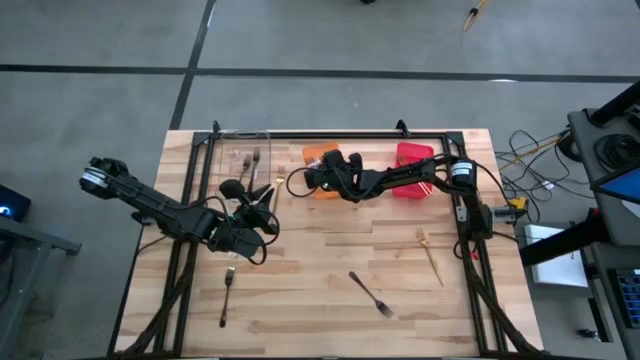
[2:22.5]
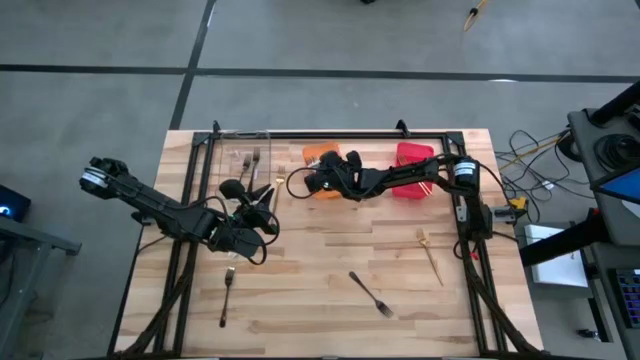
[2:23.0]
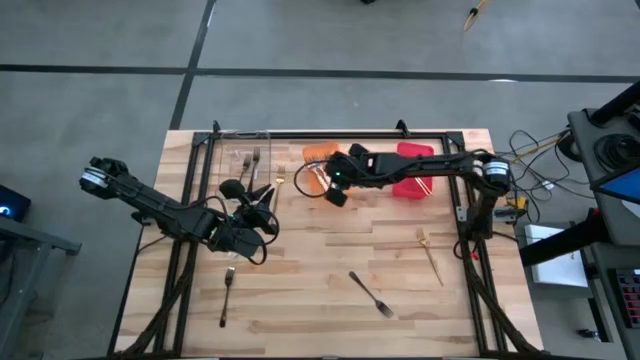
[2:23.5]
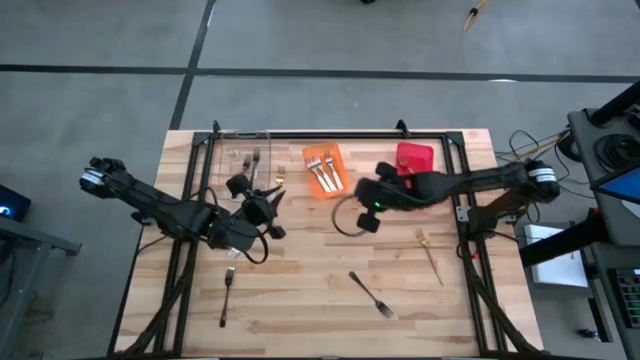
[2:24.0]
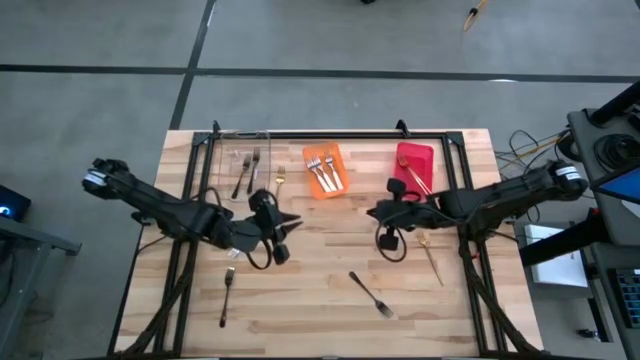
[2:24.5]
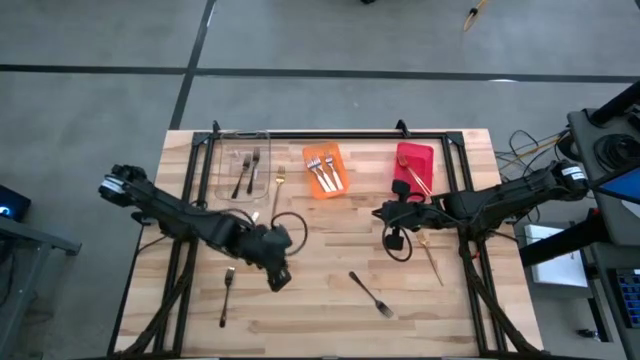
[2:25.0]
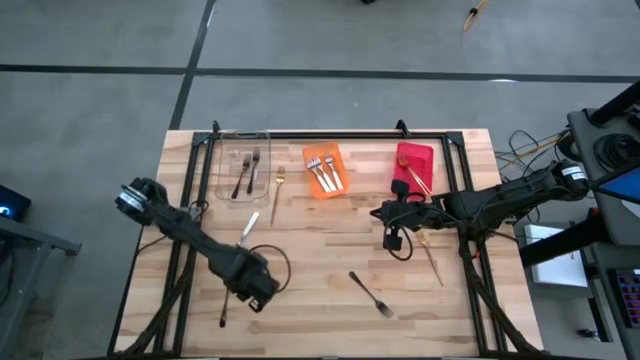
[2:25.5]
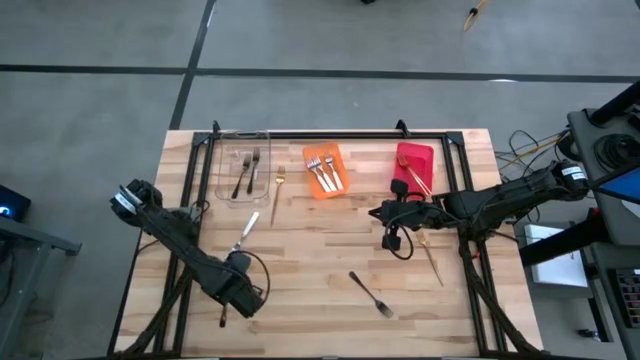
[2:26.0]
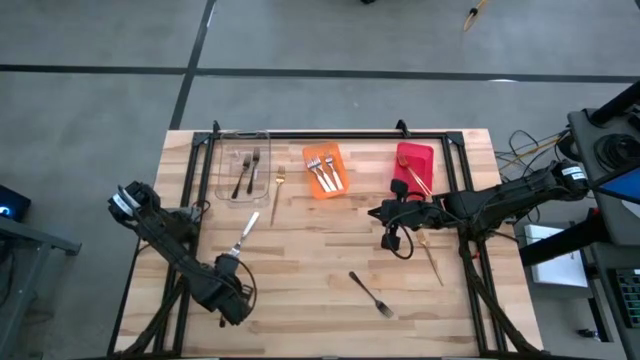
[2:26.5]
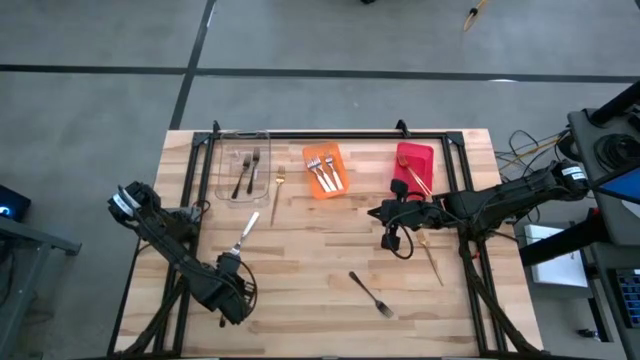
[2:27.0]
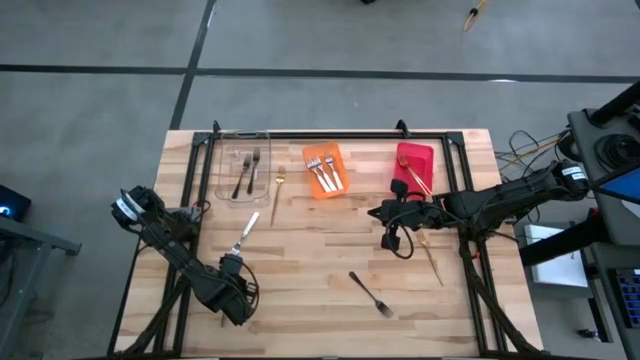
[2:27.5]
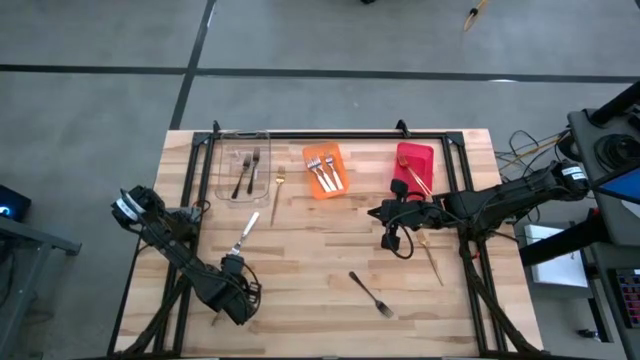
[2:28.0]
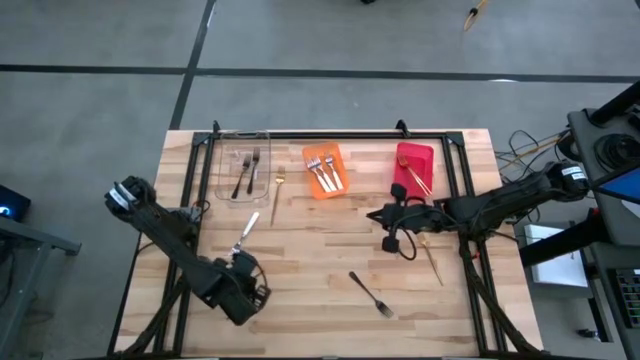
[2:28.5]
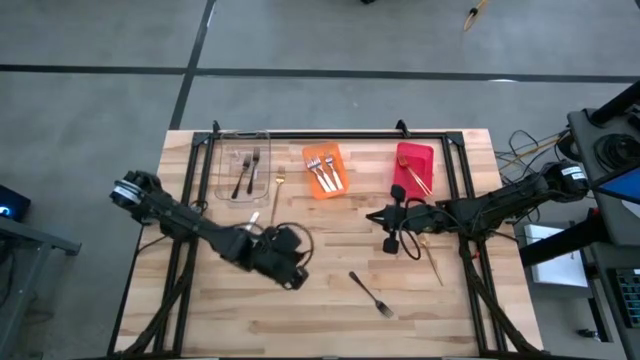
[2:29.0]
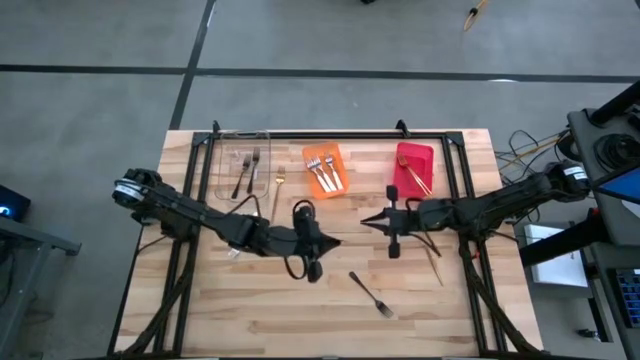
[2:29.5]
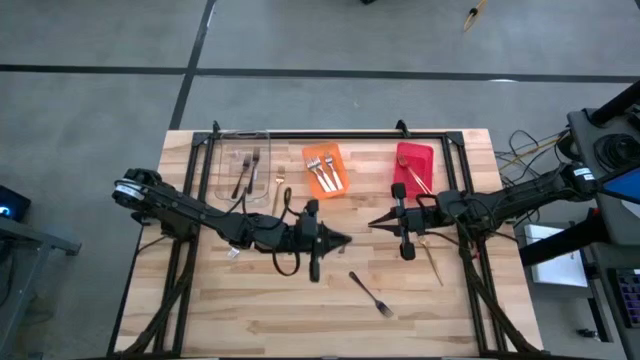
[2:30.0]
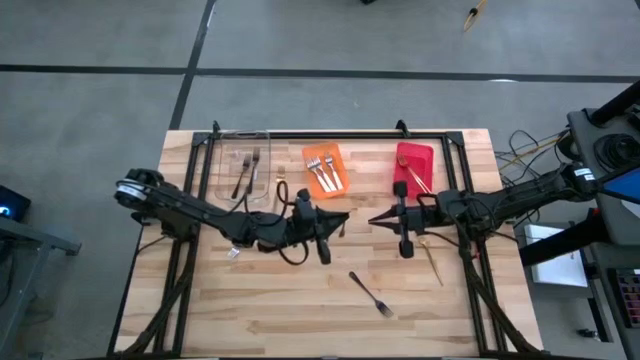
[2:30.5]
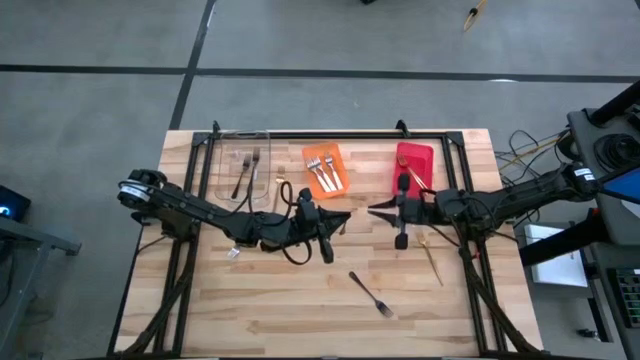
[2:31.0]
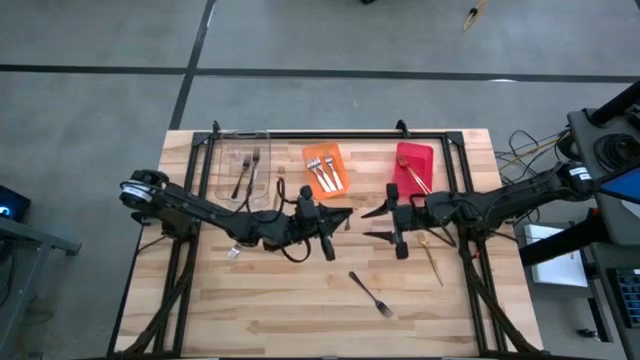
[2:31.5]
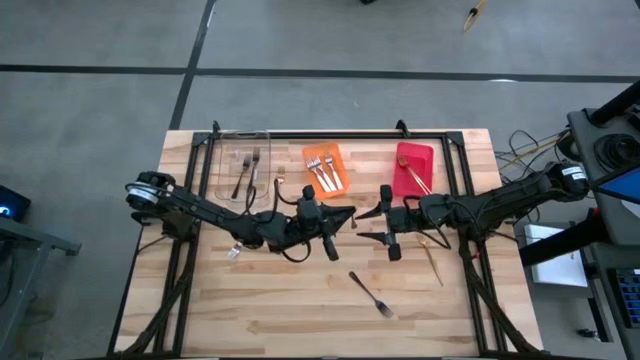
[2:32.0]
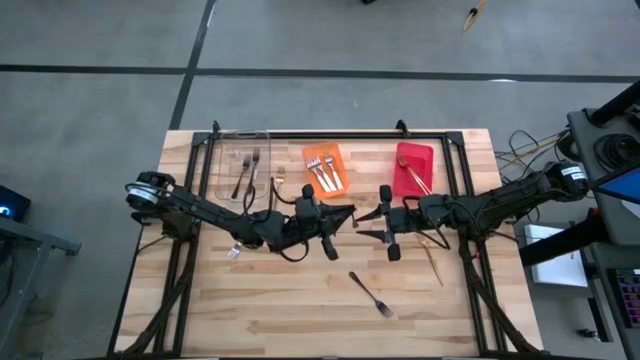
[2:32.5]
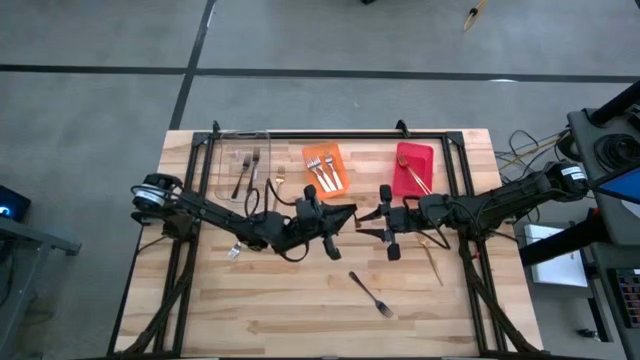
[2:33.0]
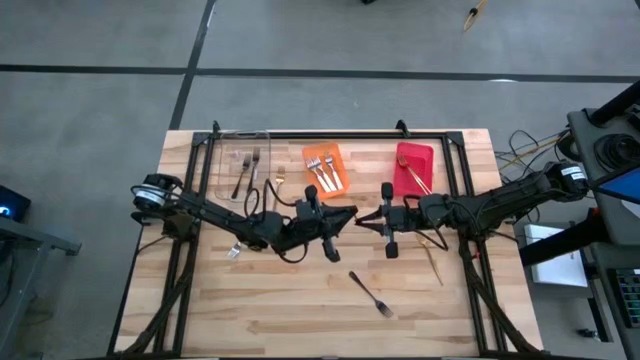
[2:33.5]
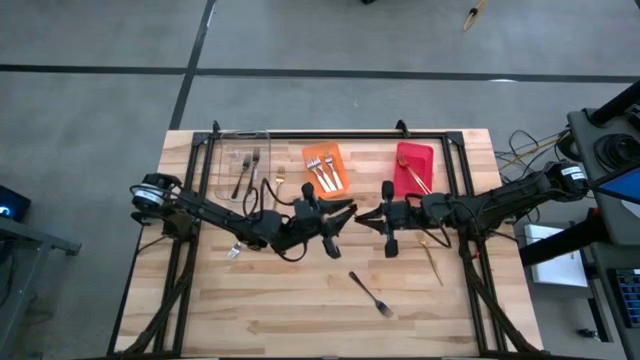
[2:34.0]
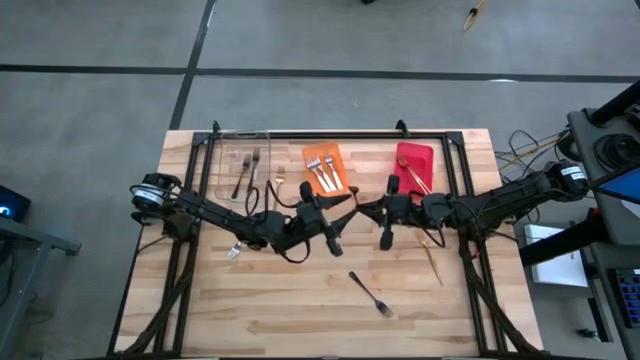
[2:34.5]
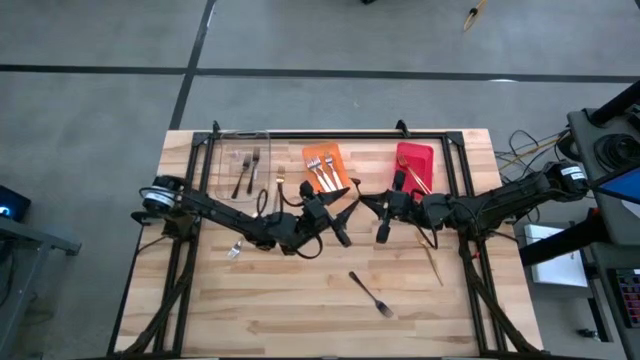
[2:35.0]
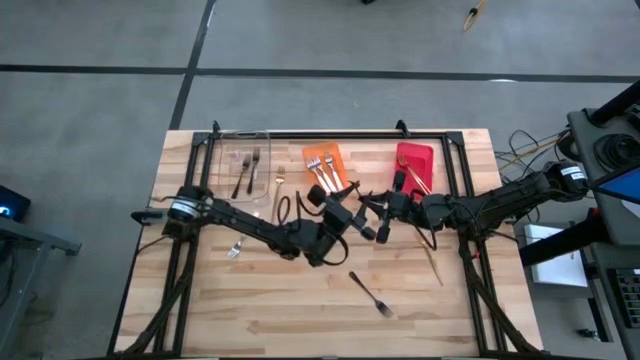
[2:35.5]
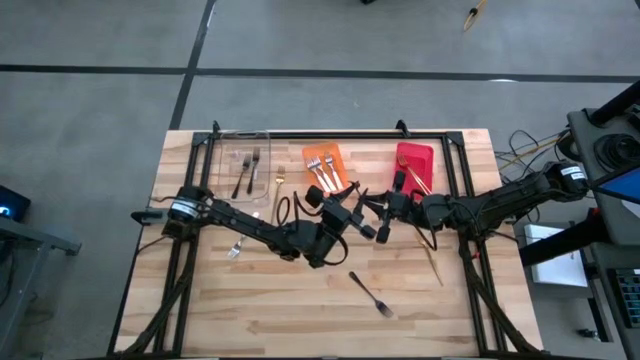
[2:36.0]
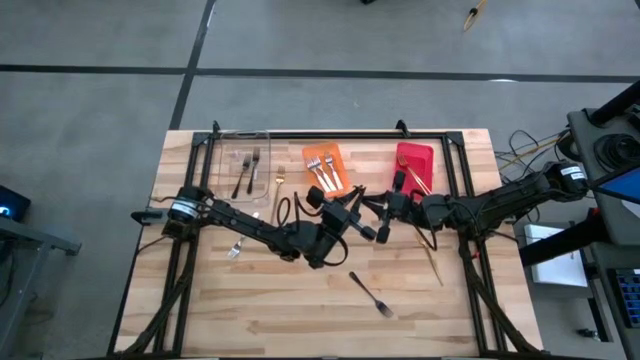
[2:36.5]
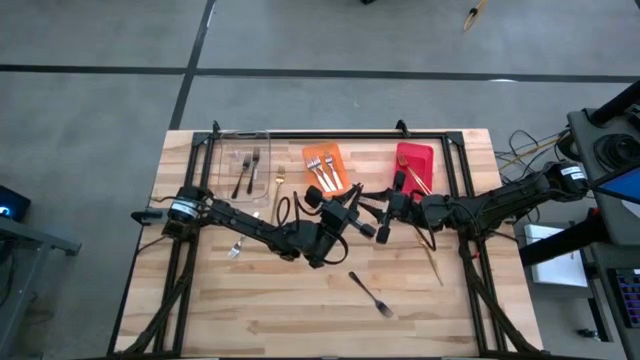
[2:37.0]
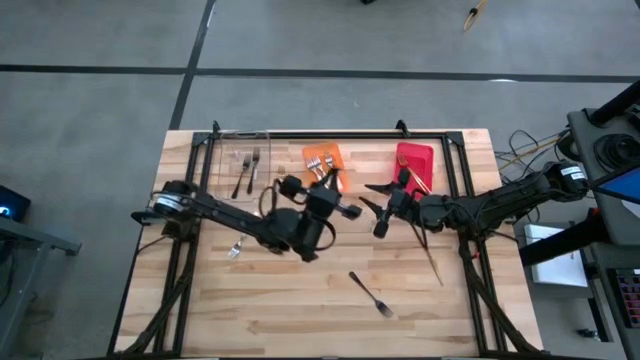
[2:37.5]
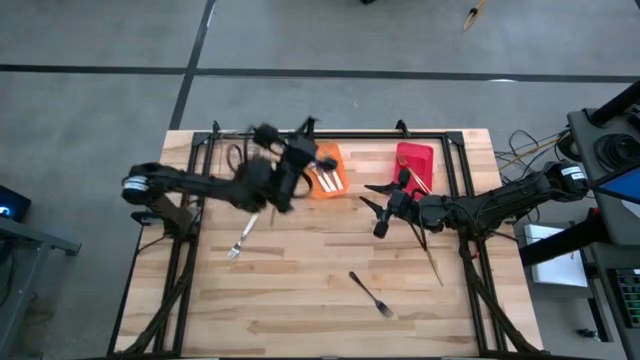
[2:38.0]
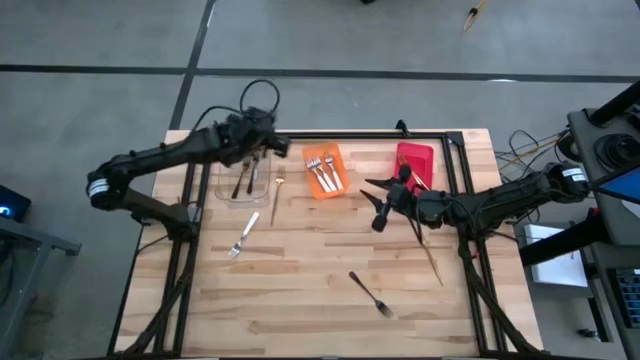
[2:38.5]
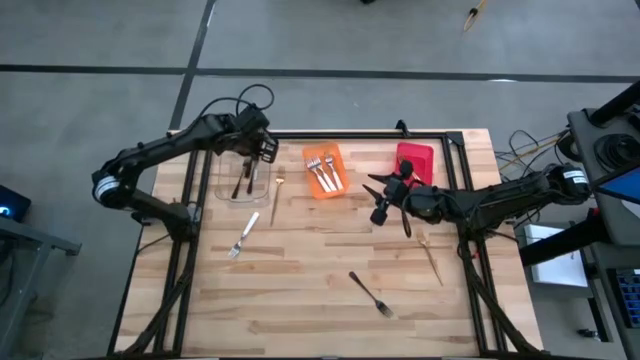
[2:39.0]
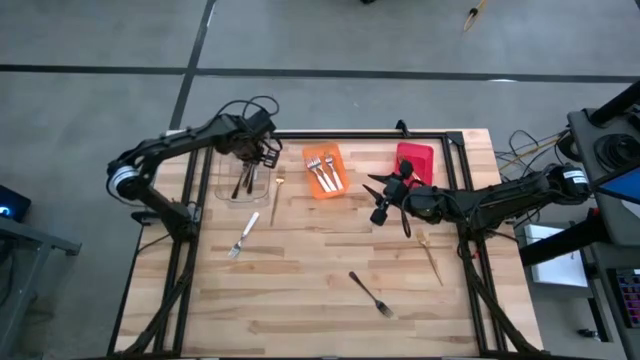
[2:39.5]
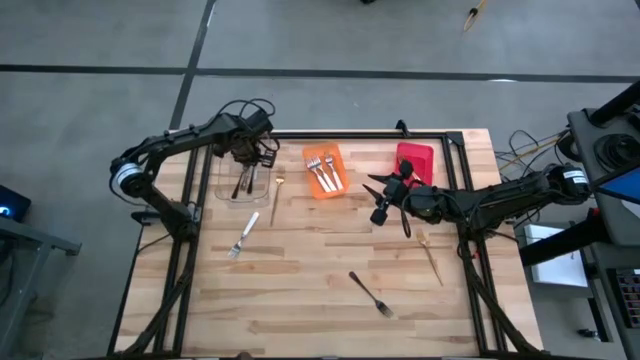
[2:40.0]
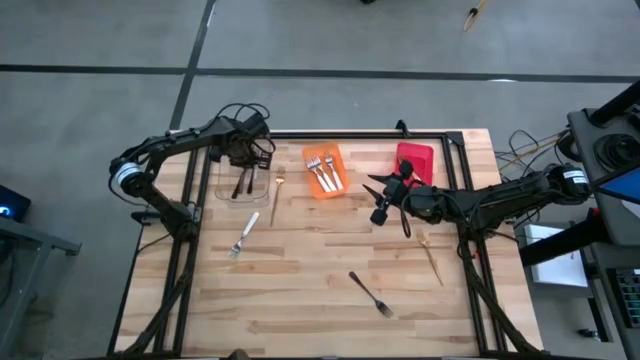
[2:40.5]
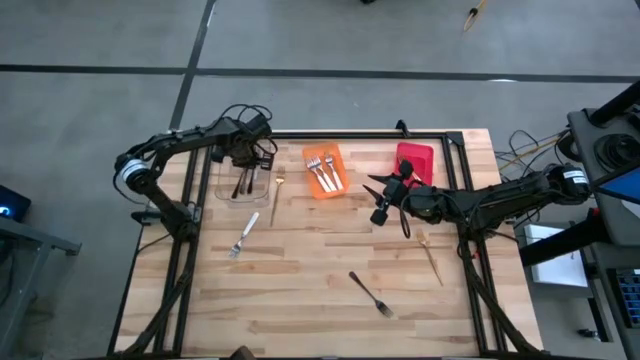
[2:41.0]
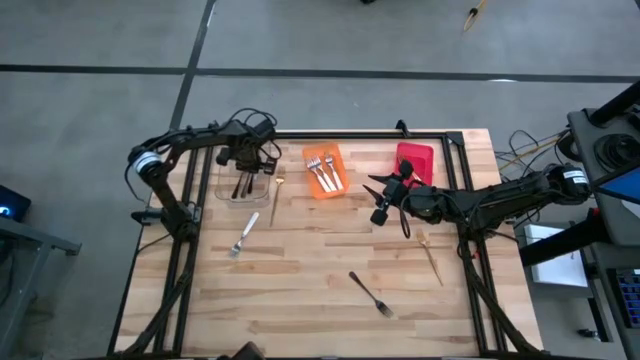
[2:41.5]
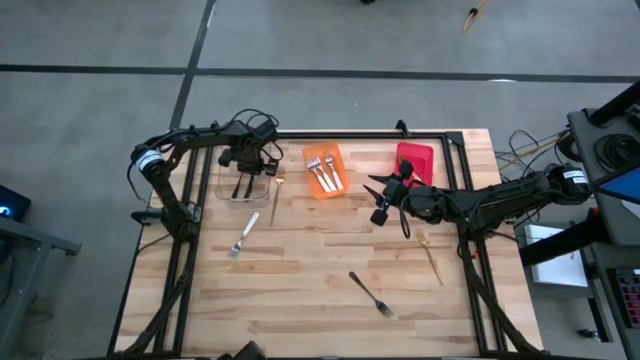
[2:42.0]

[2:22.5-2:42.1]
Task: Sort silverware by color (type)
Put the left black fork into the transparent bin

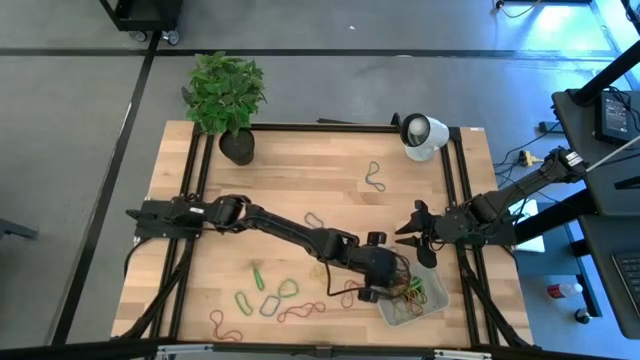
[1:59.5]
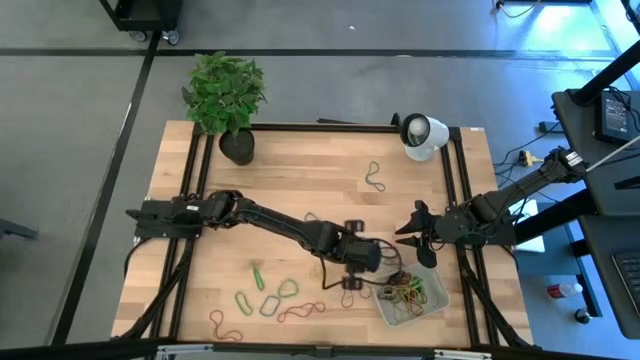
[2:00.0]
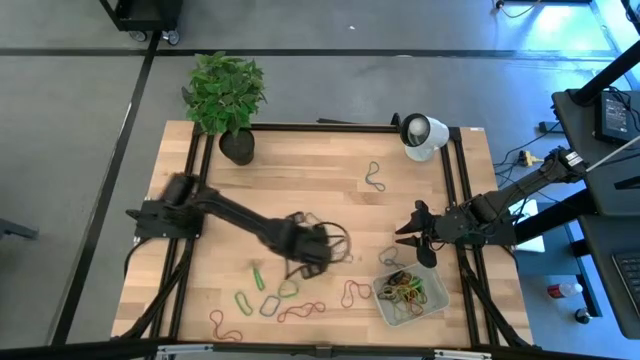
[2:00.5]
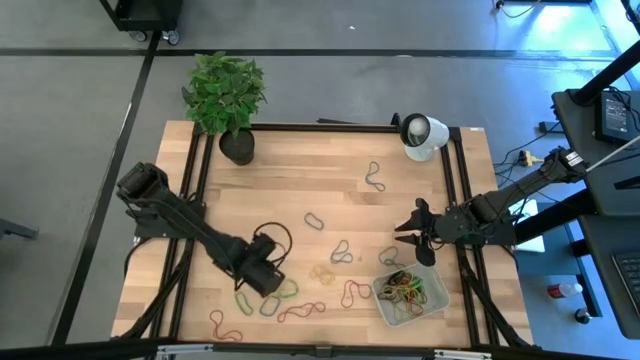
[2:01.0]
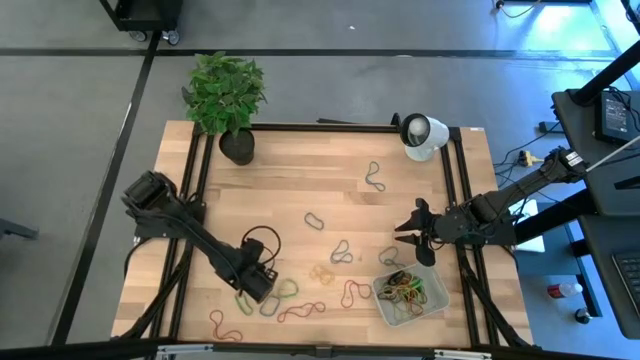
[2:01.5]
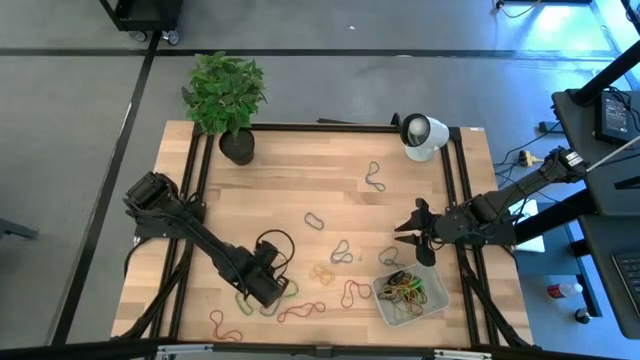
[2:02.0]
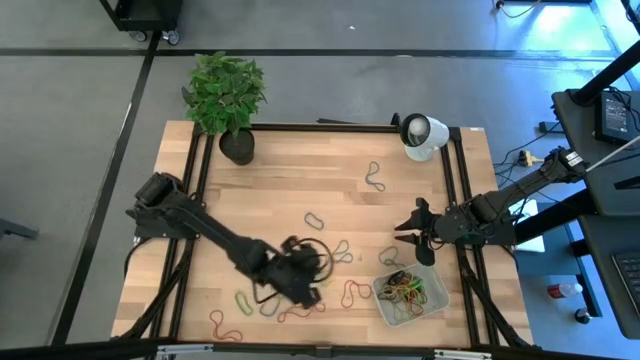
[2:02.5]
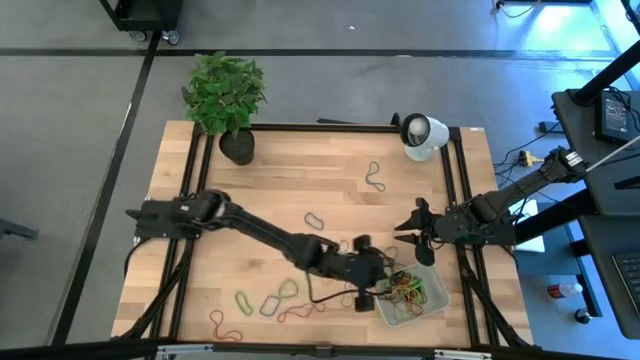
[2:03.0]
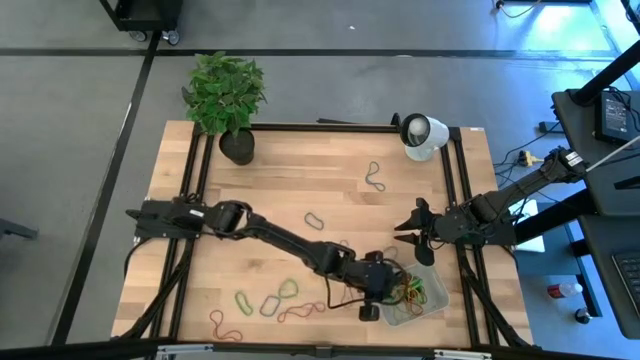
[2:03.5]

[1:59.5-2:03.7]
Task: Pick and place rubber bands into bin
Put the green rubber band into the white bin
